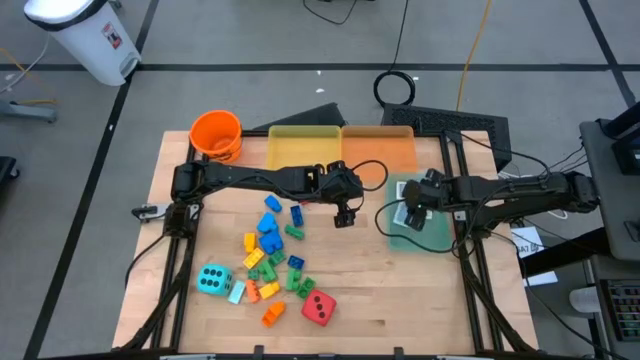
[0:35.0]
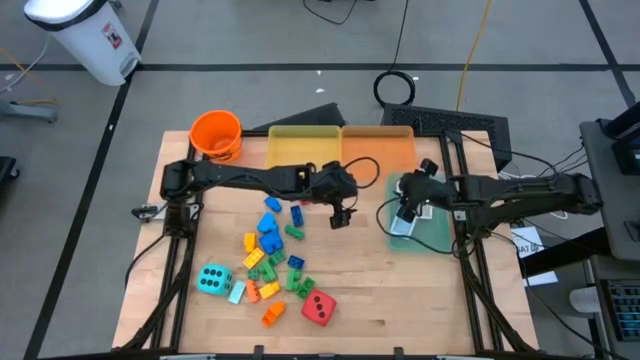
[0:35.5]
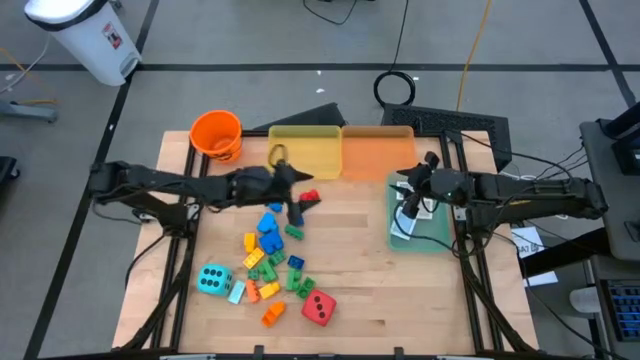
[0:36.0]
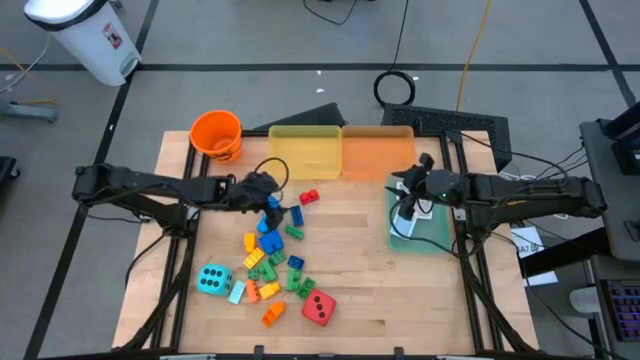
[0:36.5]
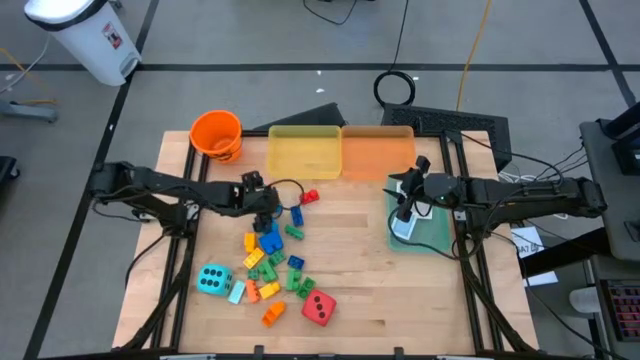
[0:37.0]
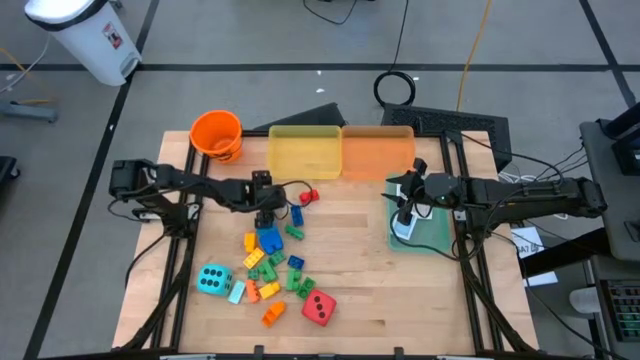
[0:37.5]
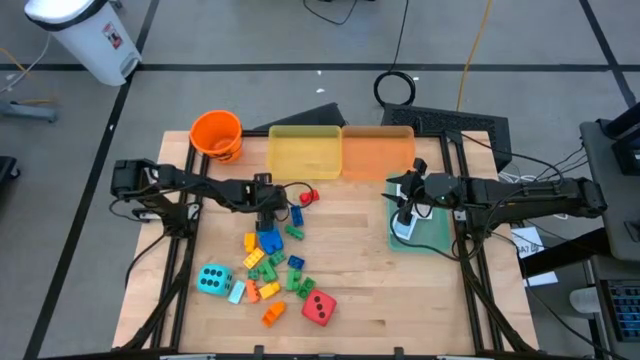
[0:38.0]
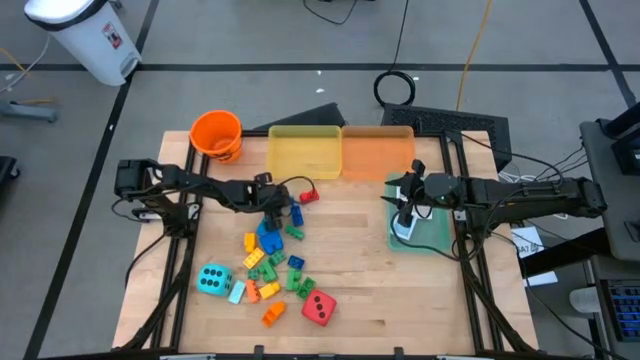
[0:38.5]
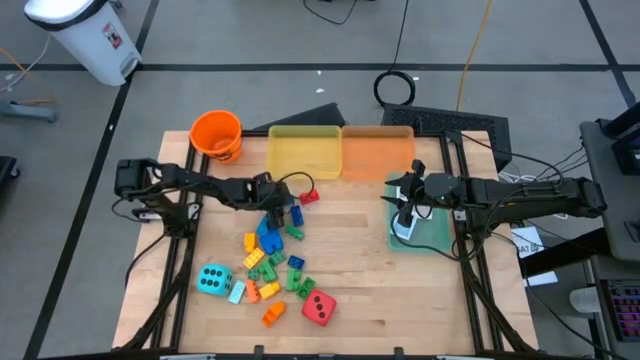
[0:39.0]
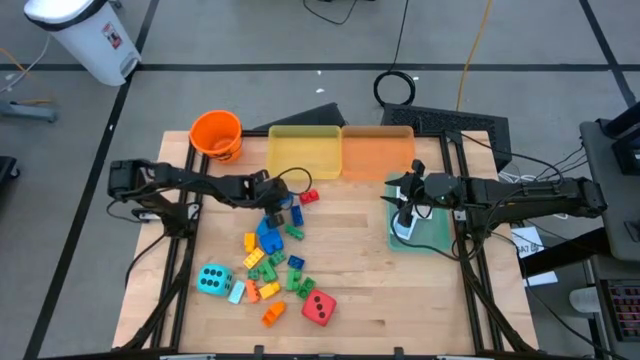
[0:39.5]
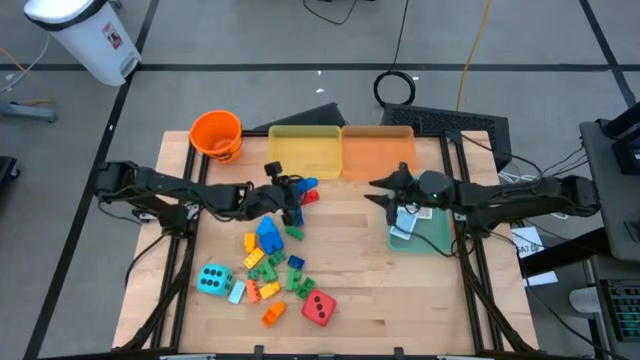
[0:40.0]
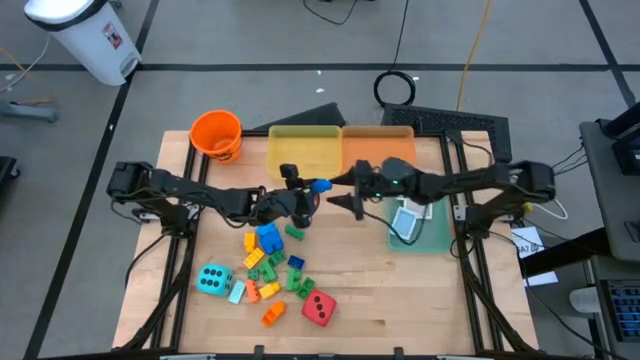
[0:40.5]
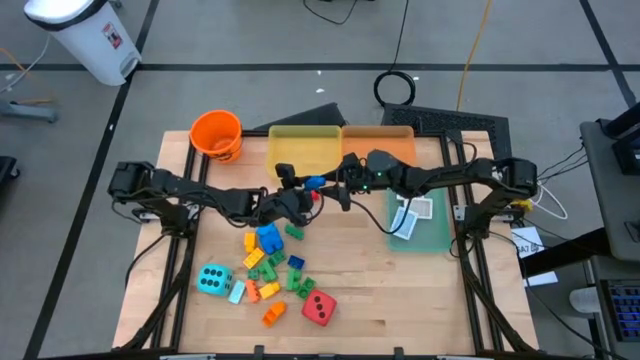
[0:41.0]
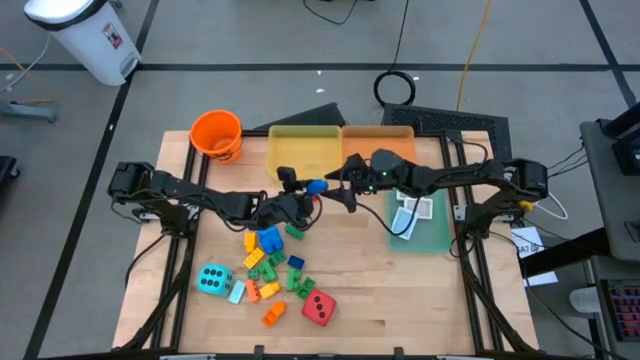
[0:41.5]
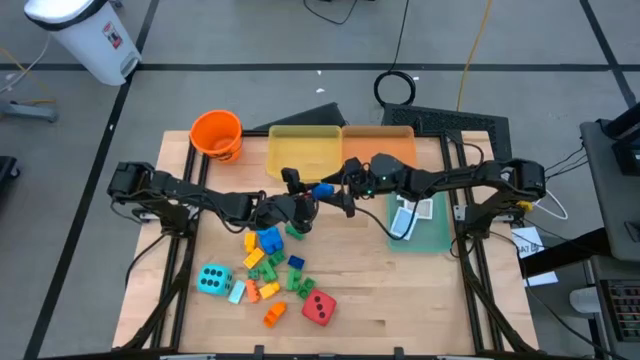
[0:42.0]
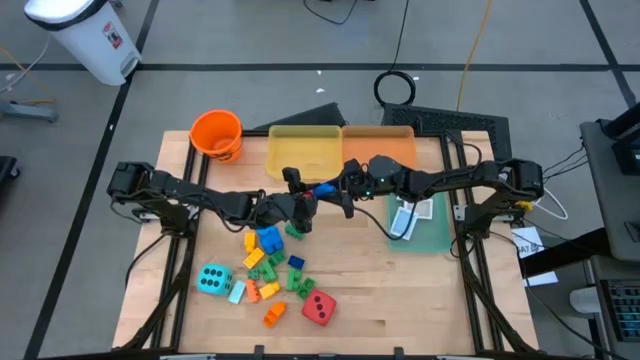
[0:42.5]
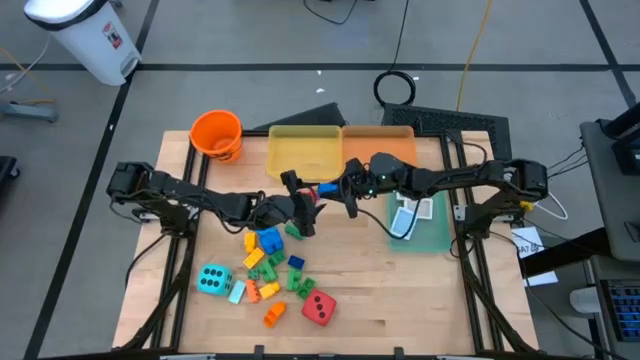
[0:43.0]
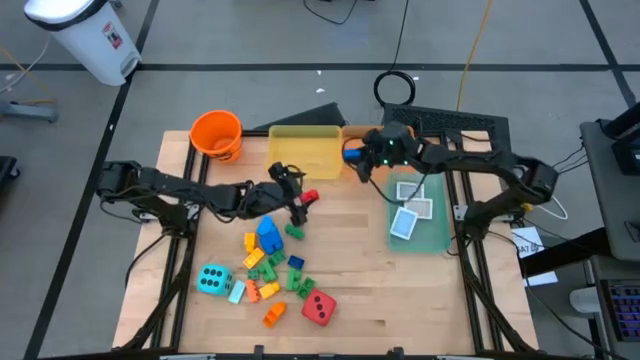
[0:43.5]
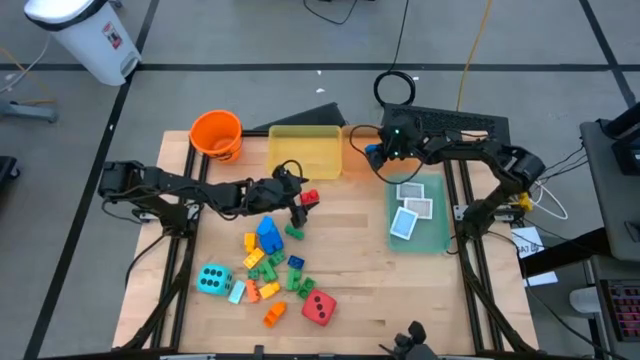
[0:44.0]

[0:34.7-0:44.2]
Task: Pick & Place Toys
Put the blue game piece into the orange bin

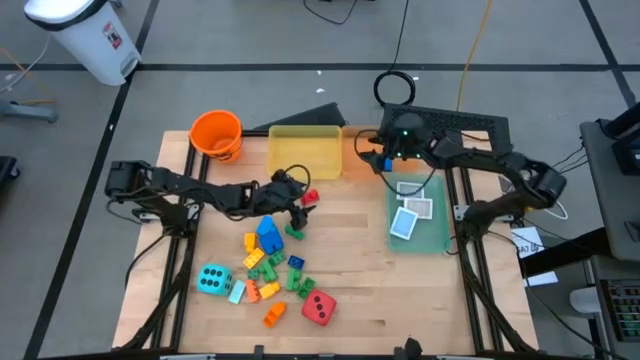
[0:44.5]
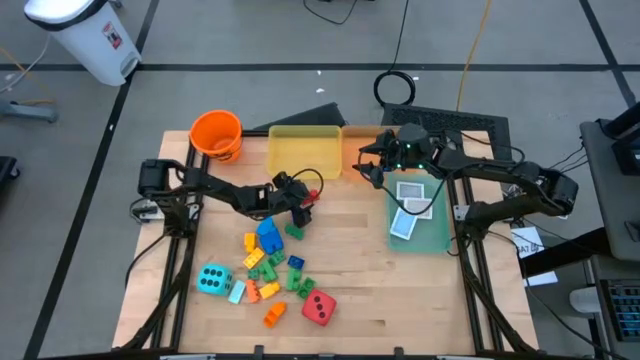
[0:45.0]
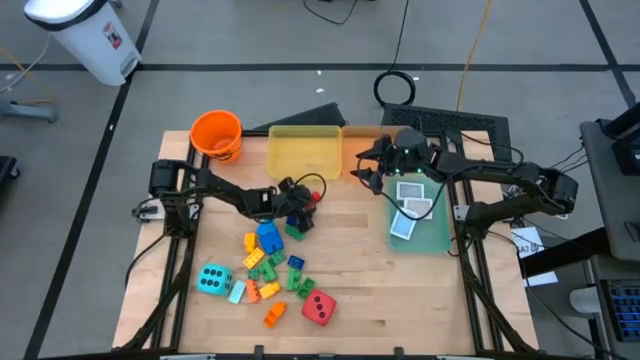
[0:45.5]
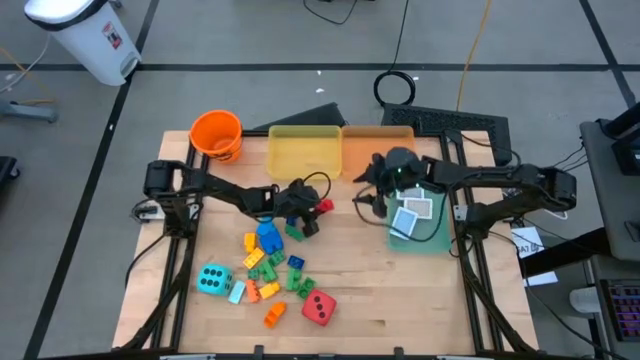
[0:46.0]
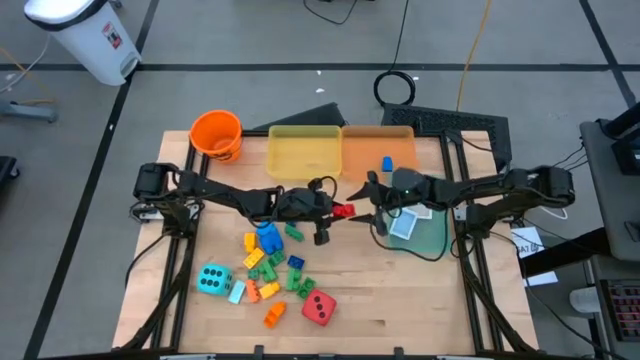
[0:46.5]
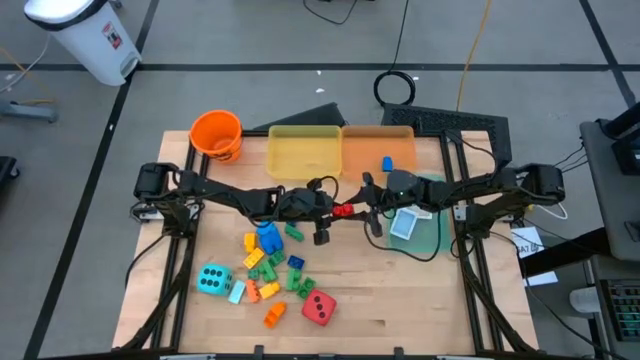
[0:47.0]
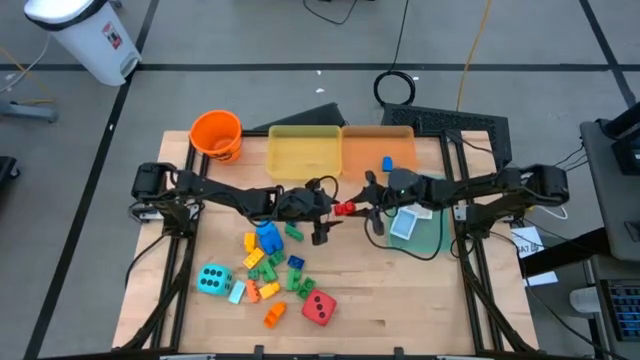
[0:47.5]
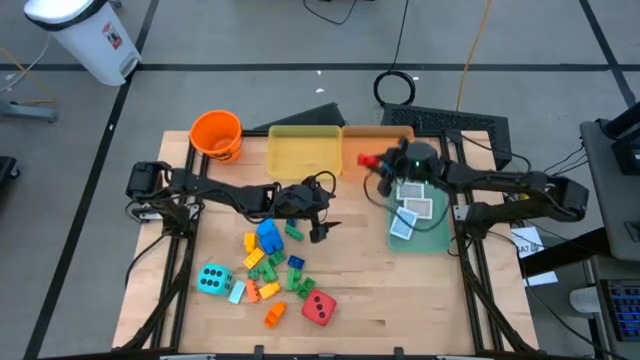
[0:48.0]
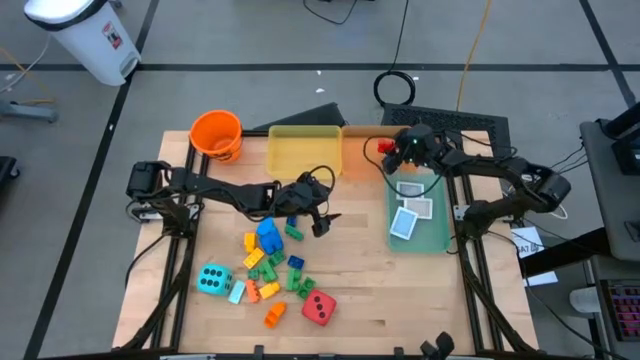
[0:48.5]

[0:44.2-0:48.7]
Put the red game piece into the orange bin

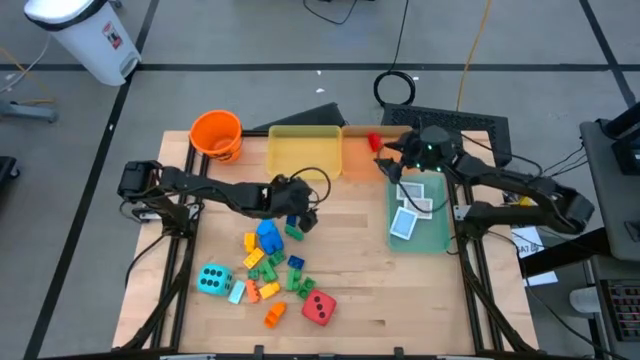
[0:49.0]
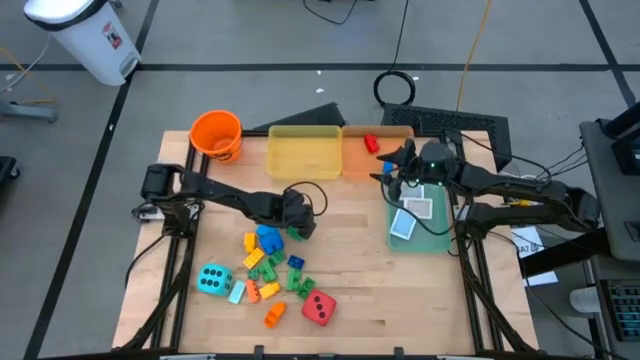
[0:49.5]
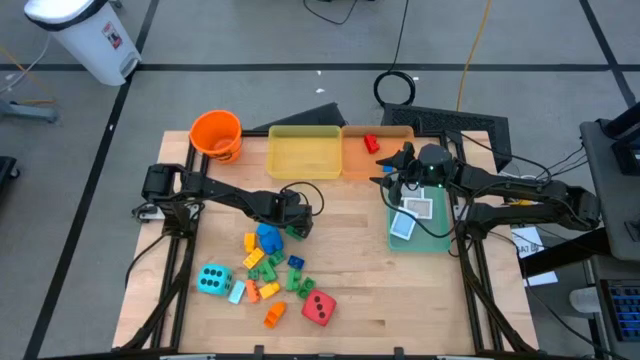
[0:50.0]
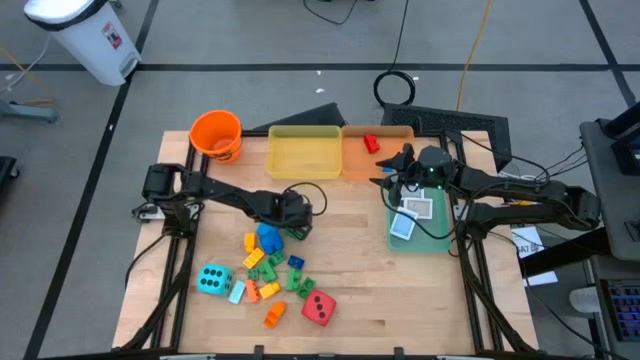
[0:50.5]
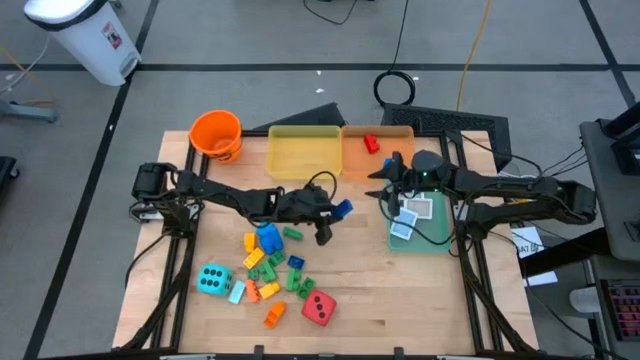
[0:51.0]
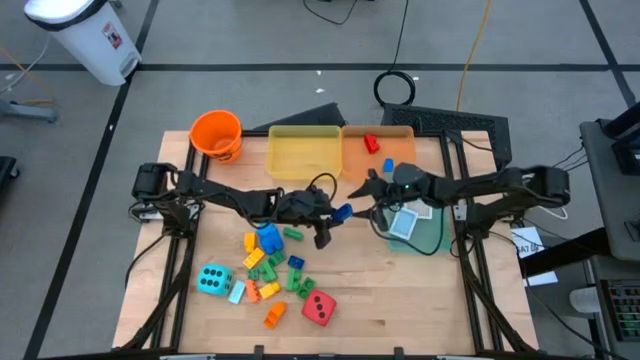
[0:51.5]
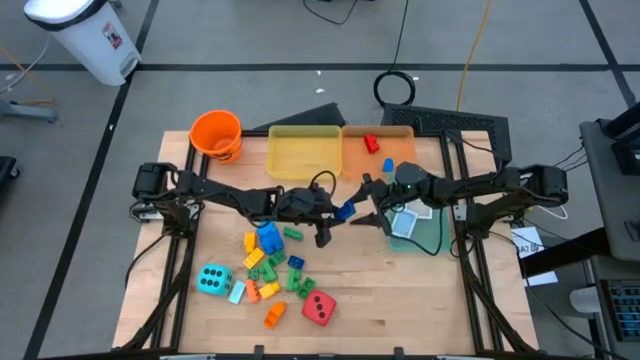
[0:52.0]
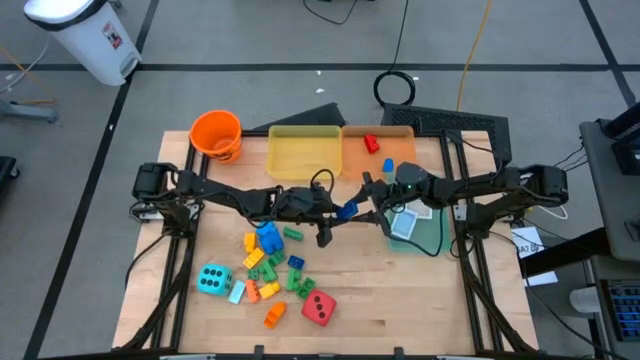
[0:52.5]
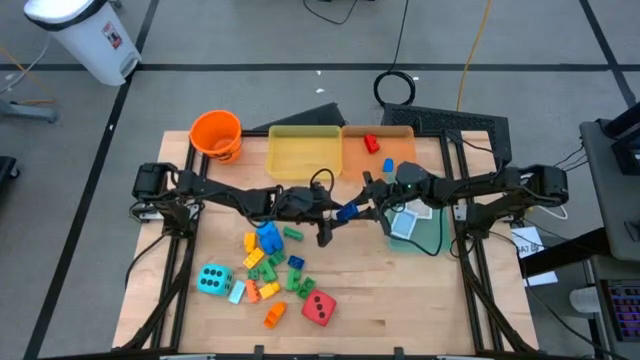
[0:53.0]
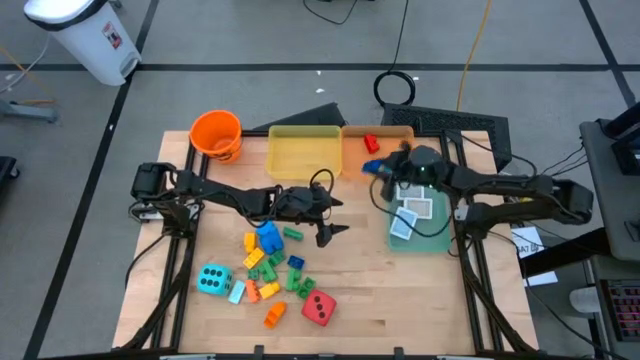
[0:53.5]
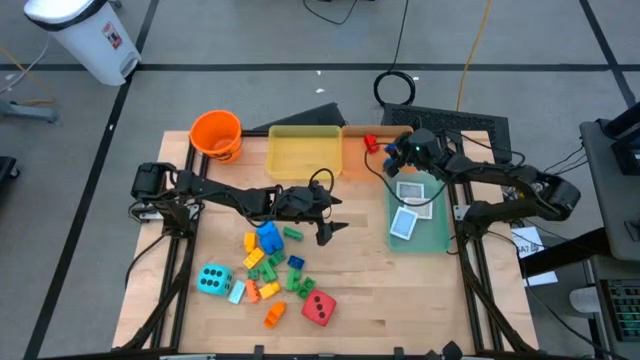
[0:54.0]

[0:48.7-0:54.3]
Put the dark blue game piece into the orange bin

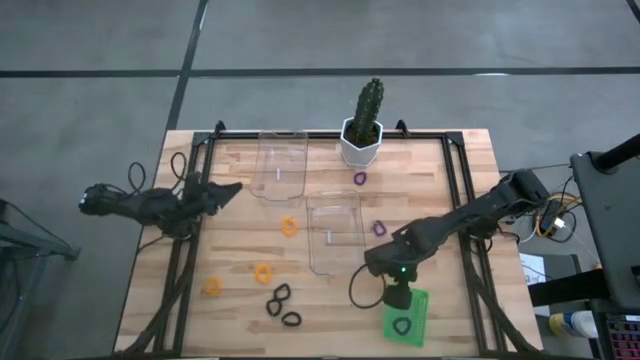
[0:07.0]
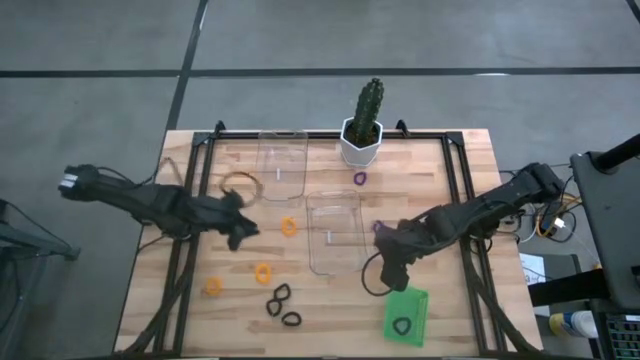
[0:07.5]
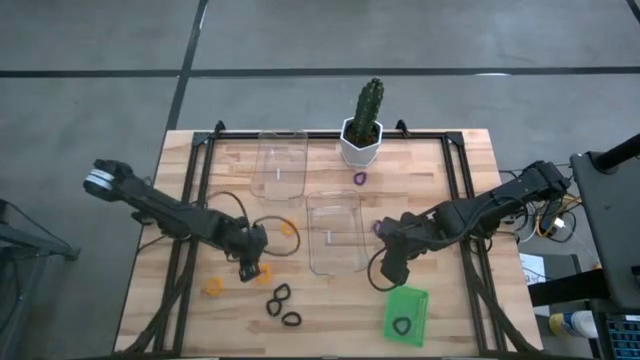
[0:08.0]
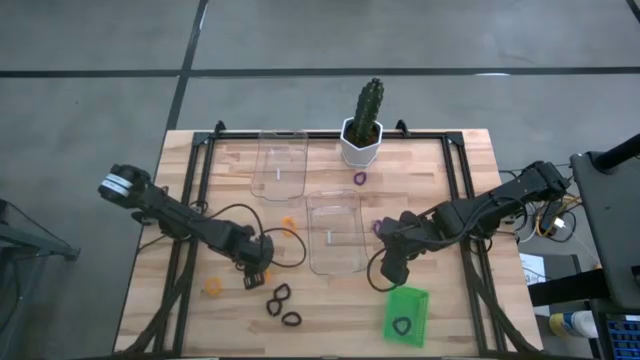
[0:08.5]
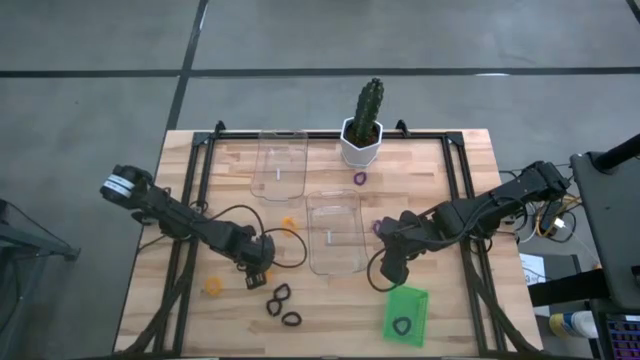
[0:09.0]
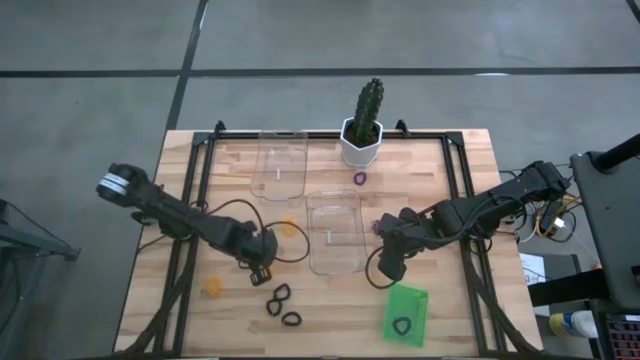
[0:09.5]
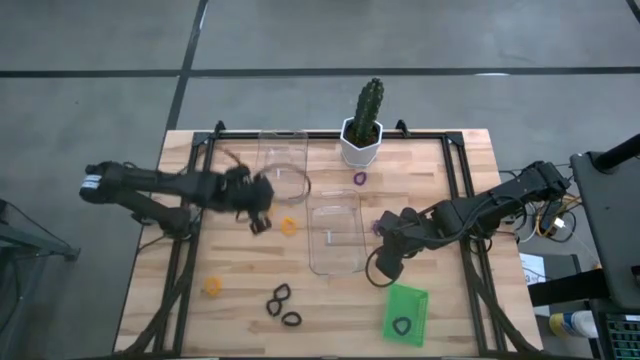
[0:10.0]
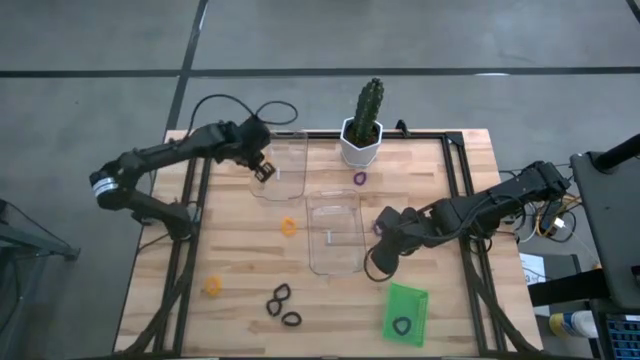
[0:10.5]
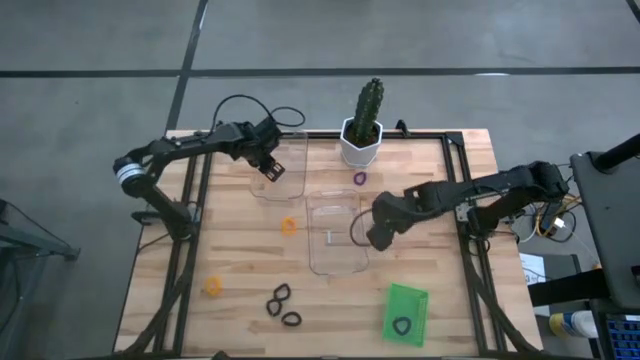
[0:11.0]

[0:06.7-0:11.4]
Task: Sort spring keychains
Put the middle yellow spring keychain into the top transparent bin
